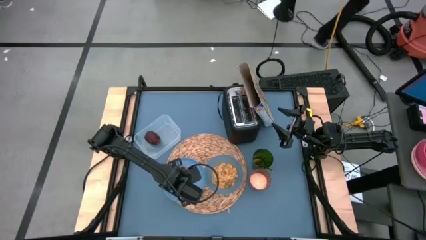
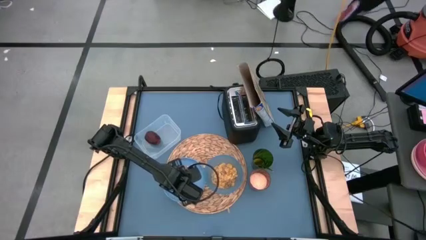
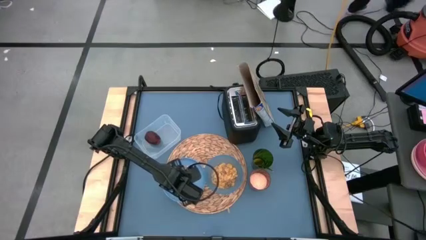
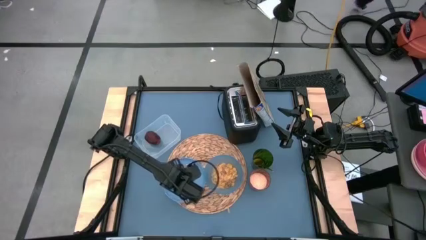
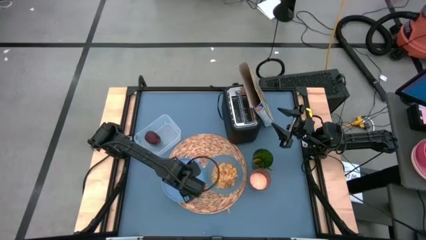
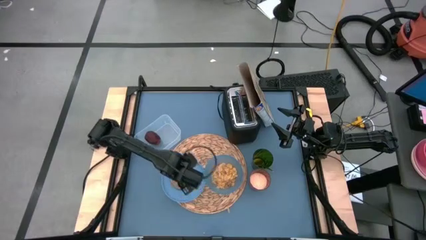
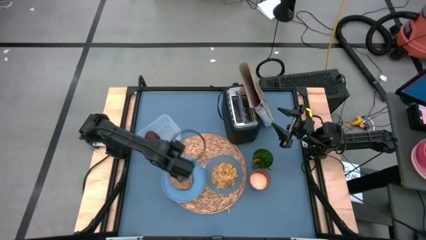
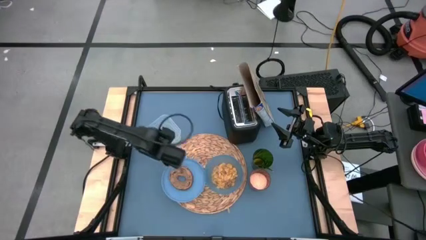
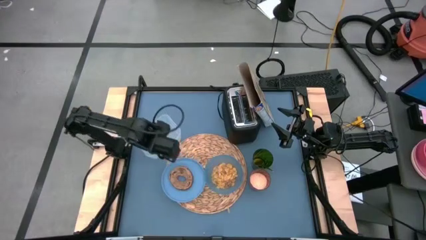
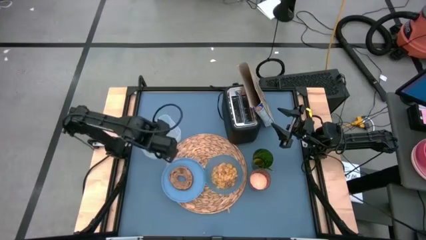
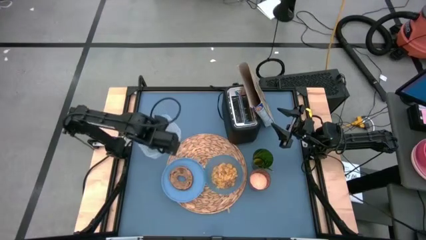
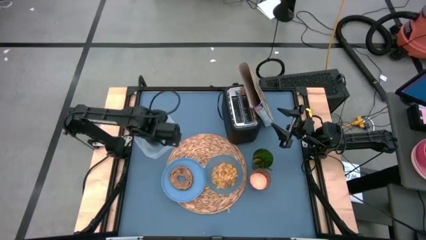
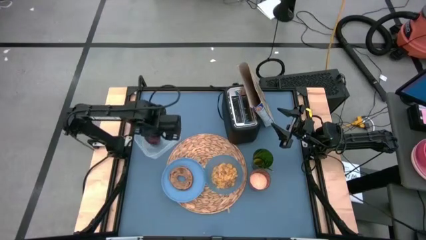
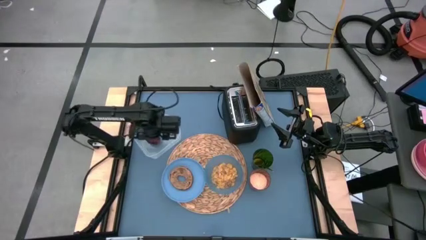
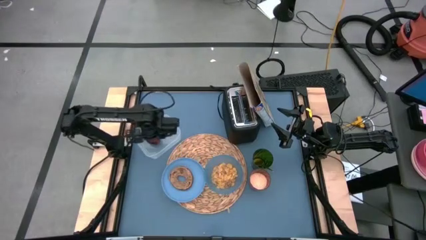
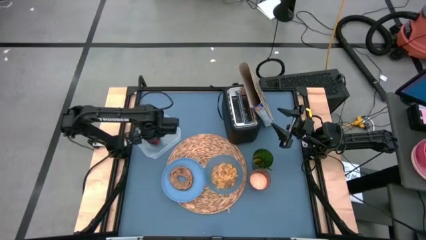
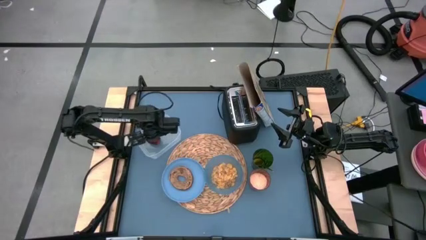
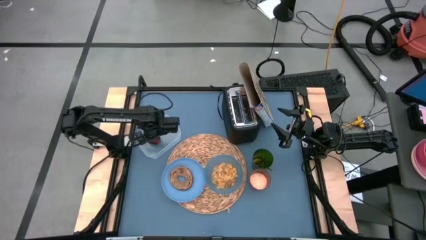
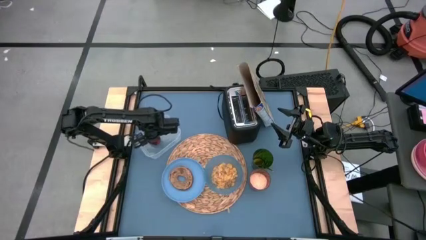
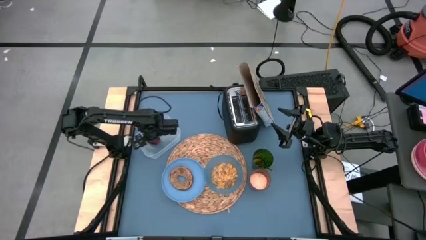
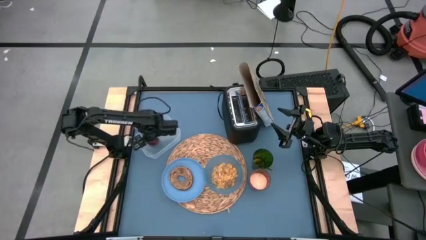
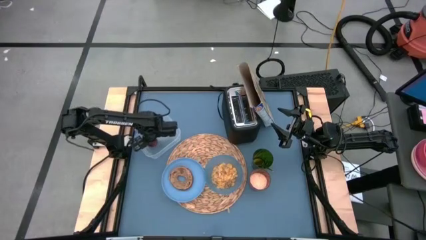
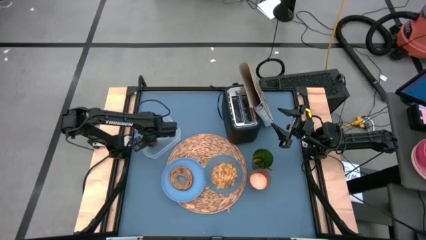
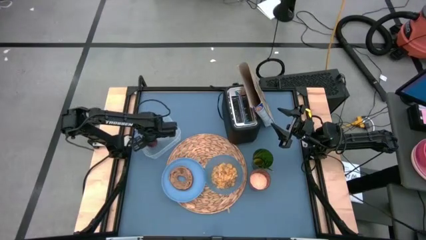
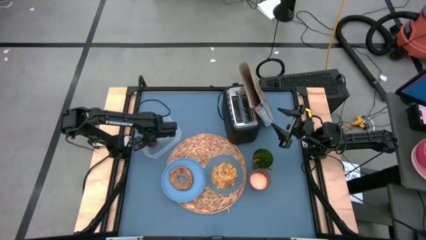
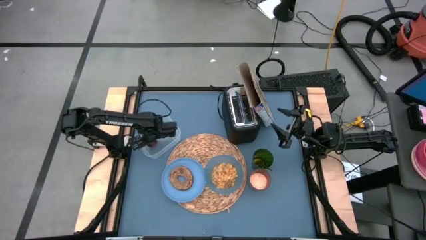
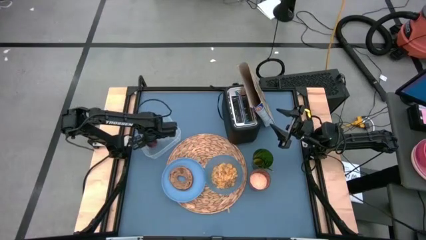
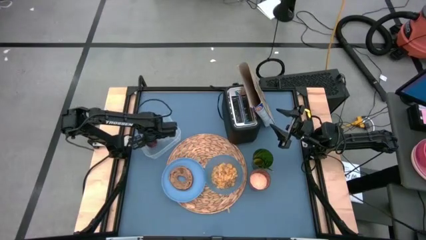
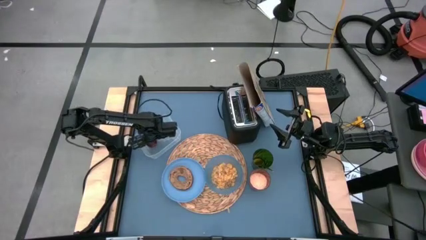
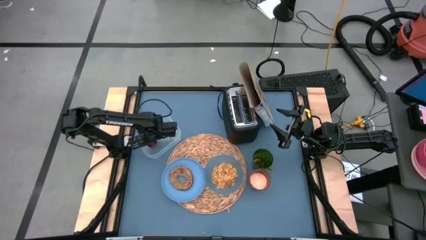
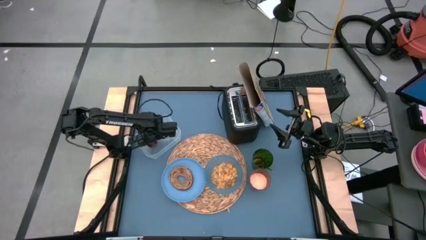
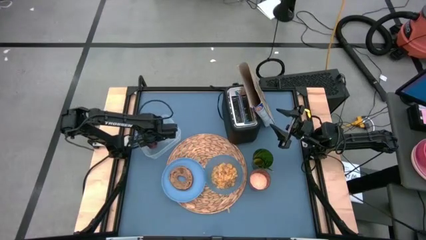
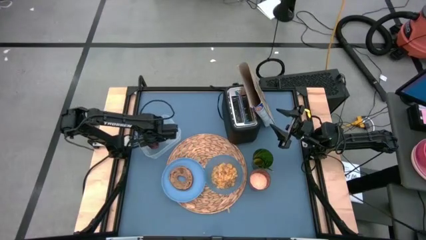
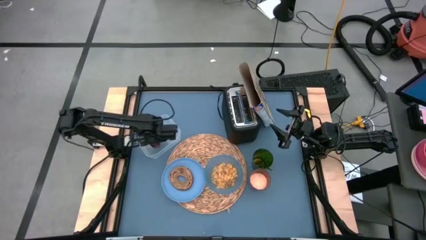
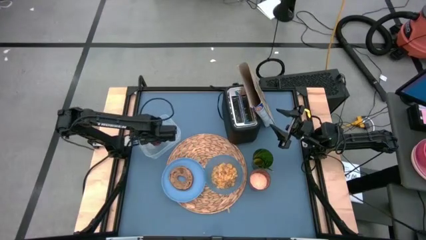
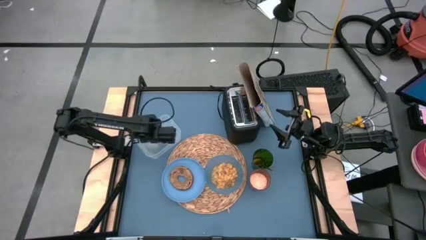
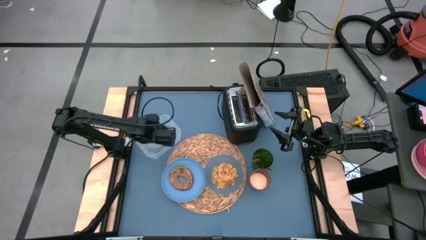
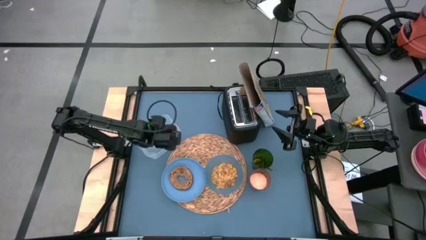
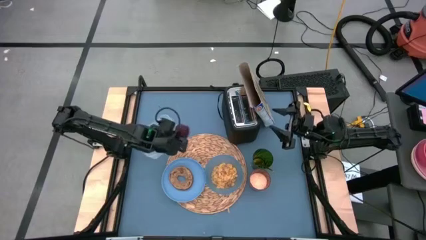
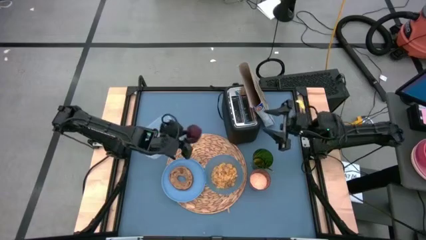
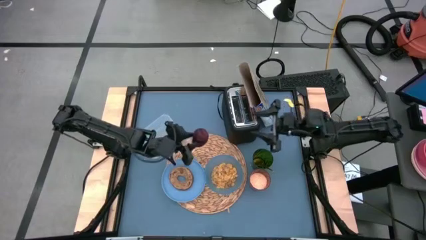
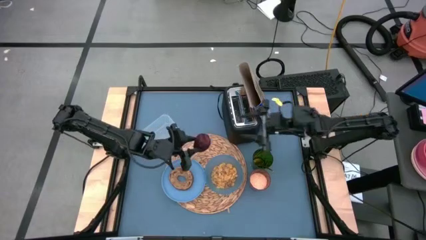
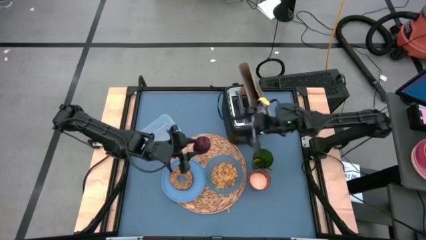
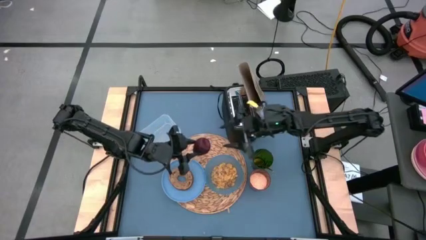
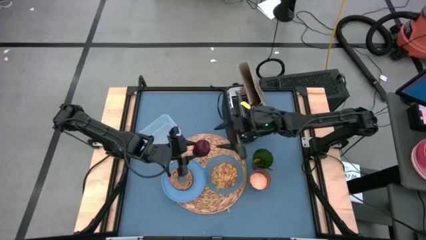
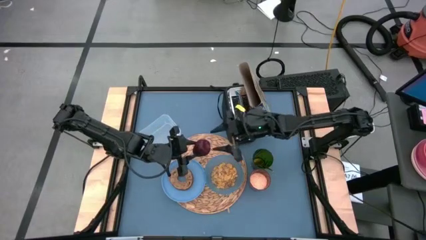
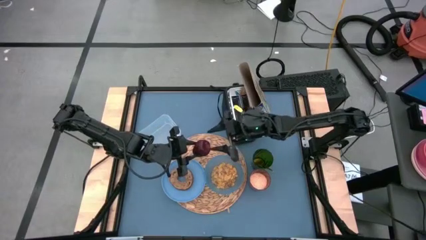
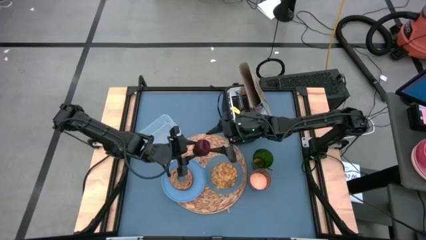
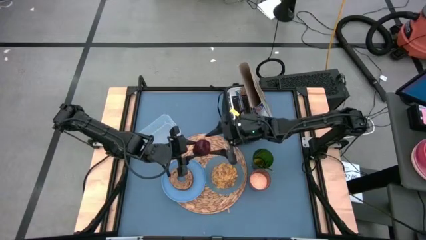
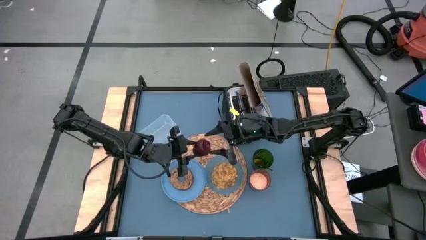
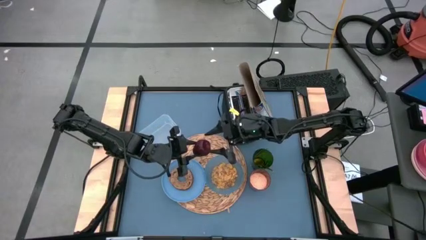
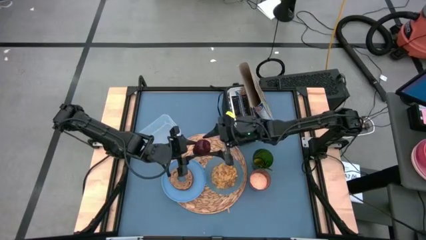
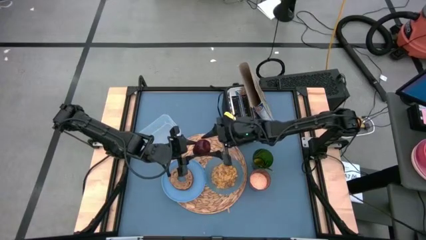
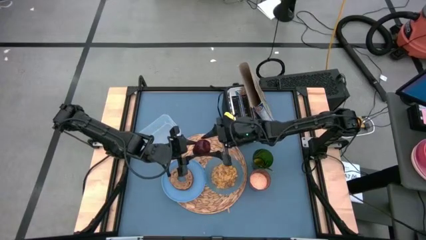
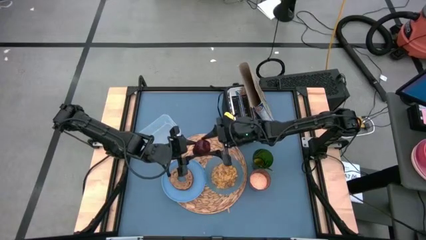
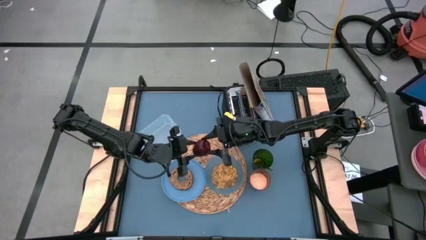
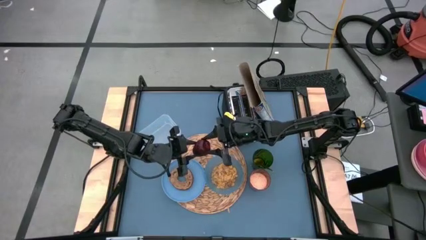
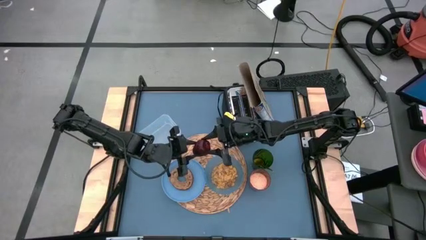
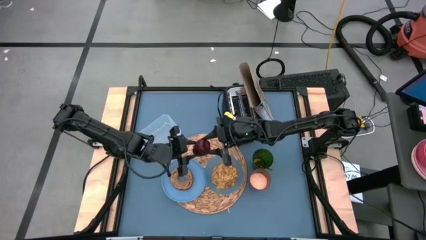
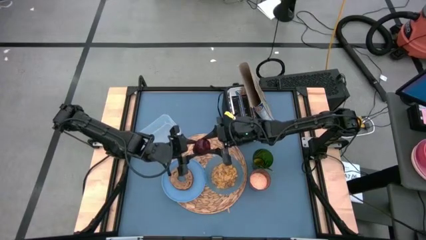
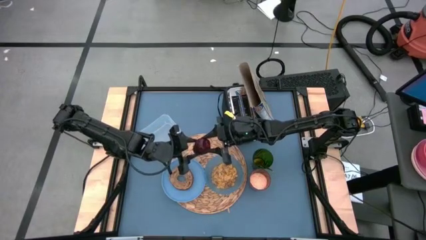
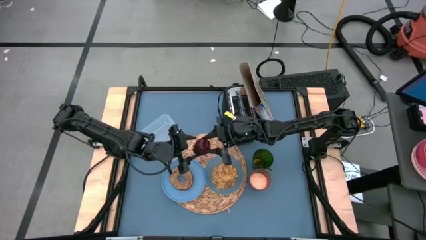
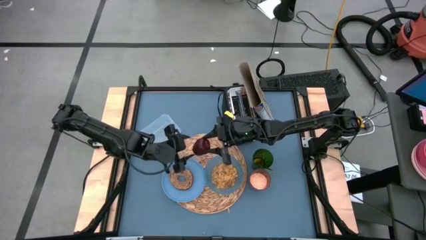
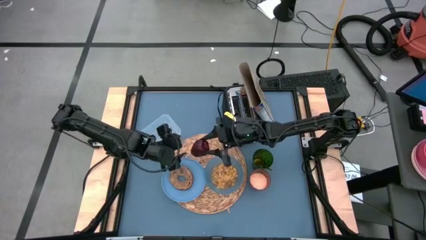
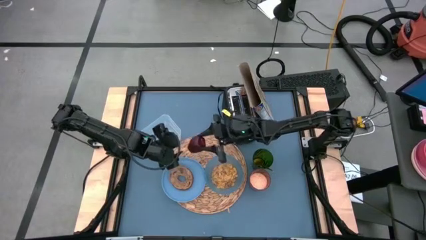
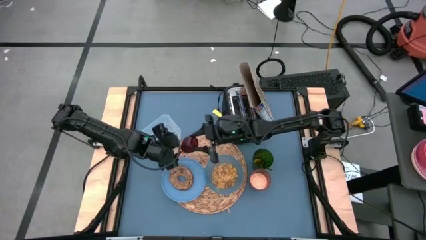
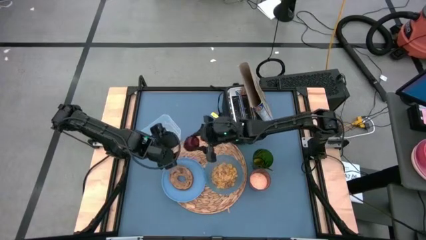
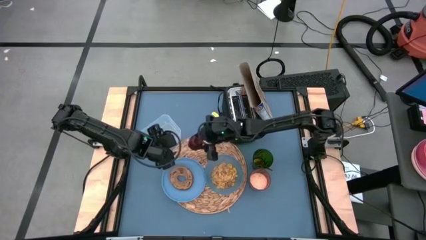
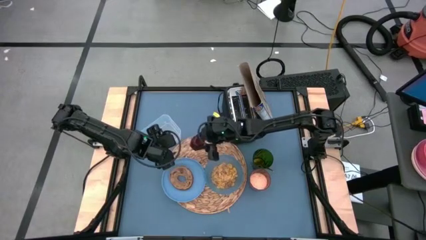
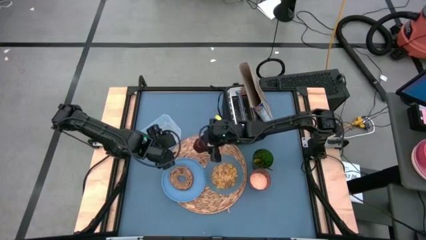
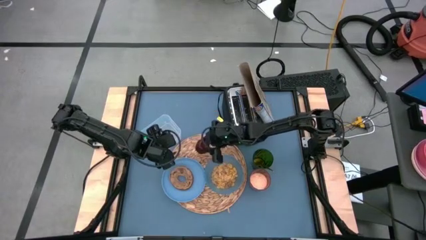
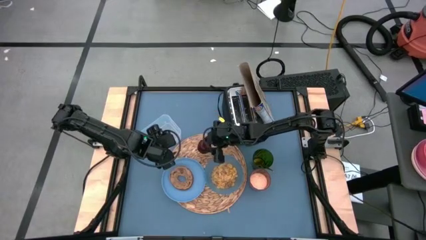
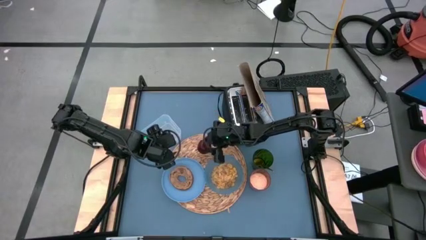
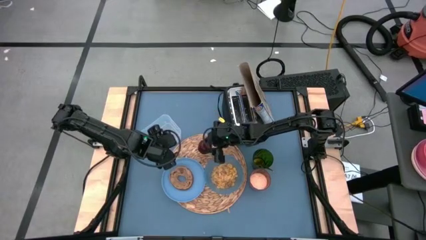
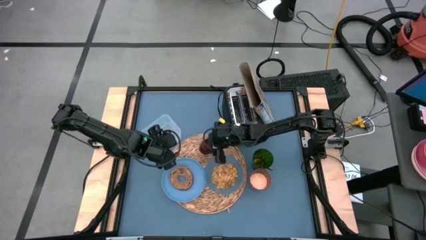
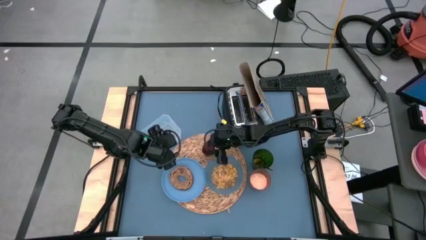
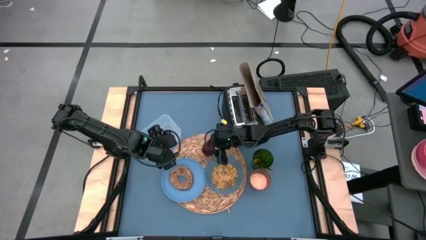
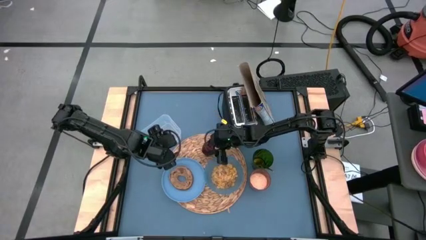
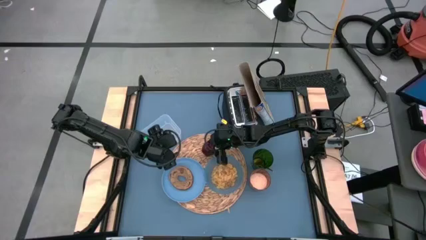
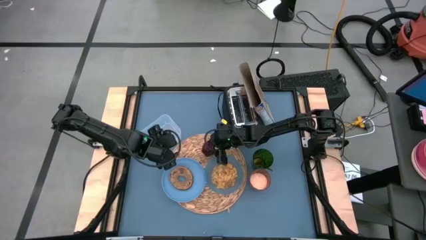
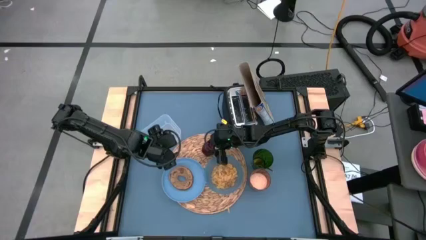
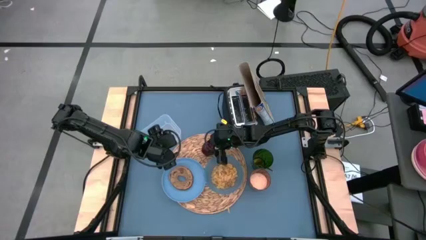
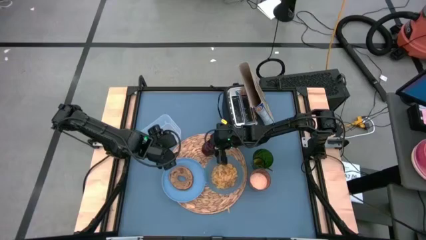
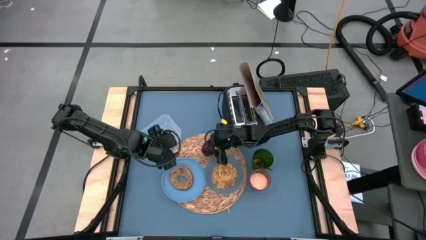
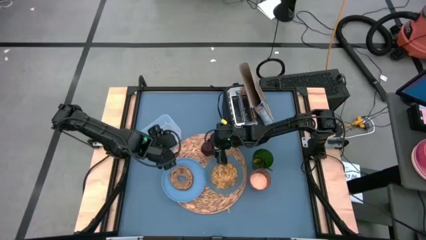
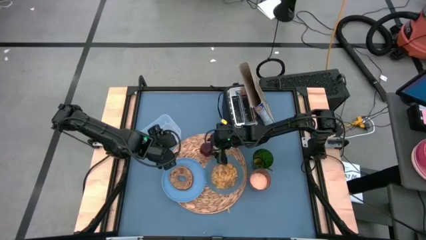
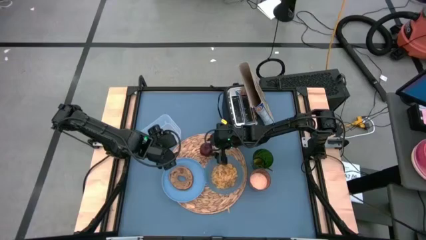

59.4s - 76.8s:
Task: Arrange a breakfast setting
Put the red apple on the table mat
